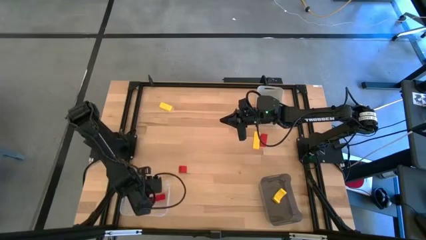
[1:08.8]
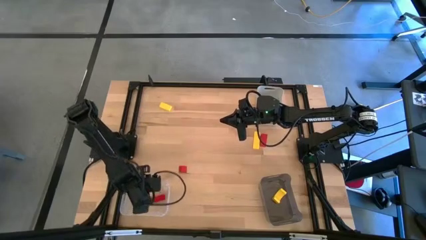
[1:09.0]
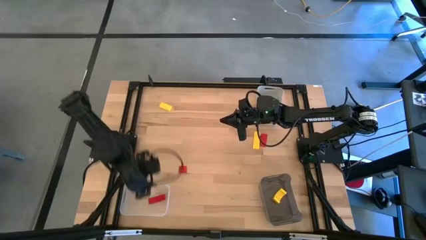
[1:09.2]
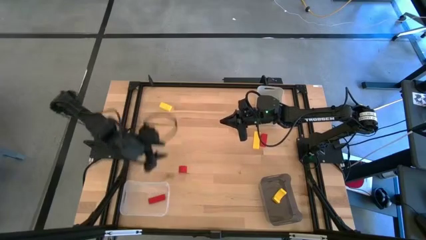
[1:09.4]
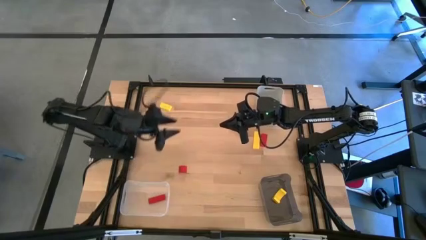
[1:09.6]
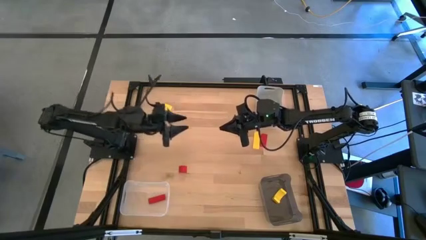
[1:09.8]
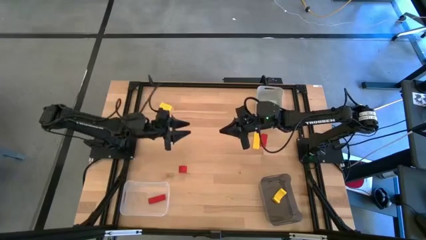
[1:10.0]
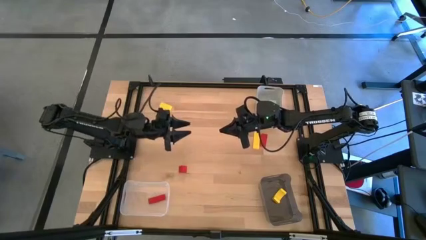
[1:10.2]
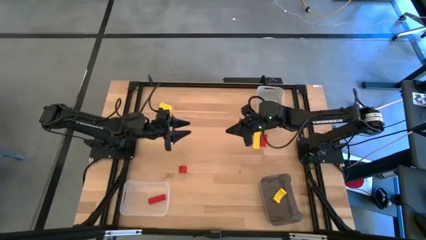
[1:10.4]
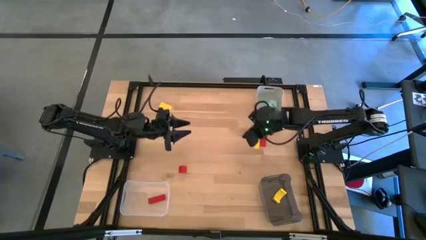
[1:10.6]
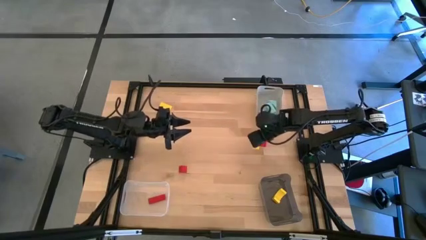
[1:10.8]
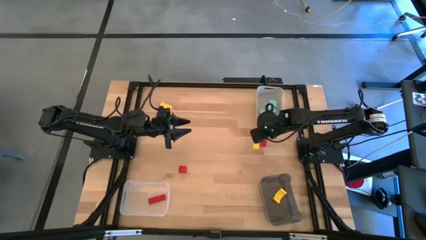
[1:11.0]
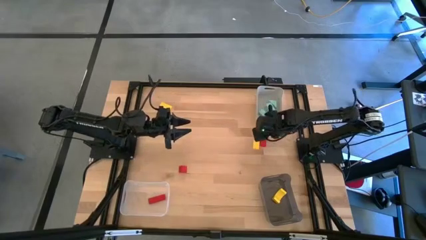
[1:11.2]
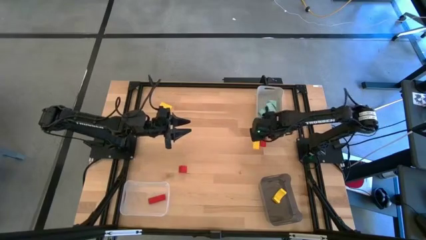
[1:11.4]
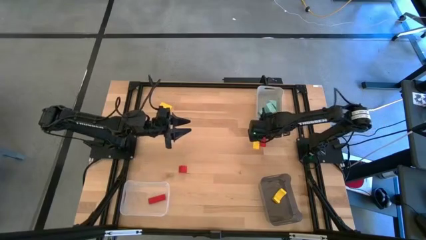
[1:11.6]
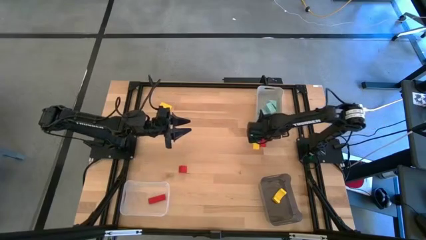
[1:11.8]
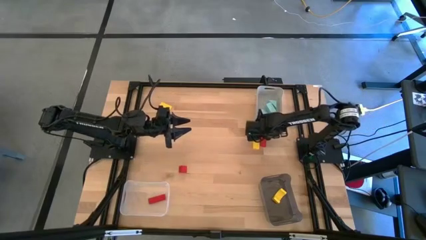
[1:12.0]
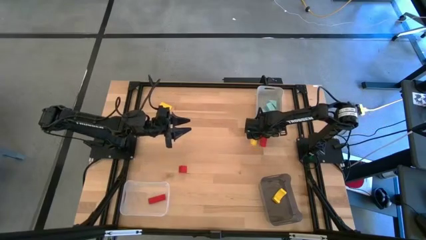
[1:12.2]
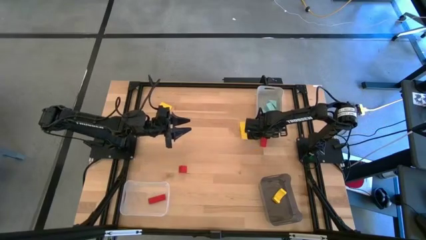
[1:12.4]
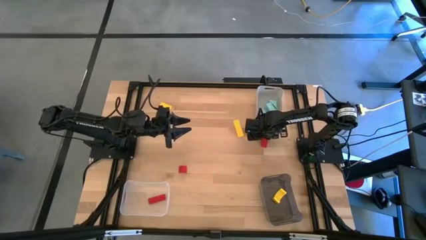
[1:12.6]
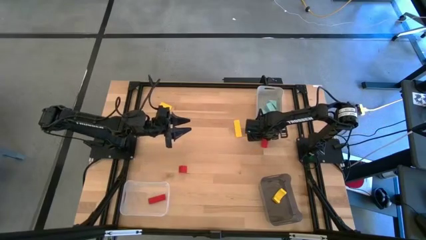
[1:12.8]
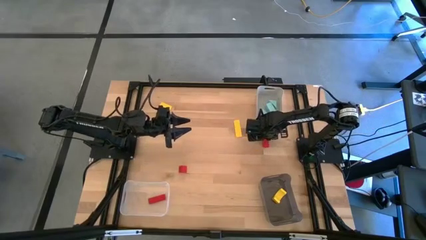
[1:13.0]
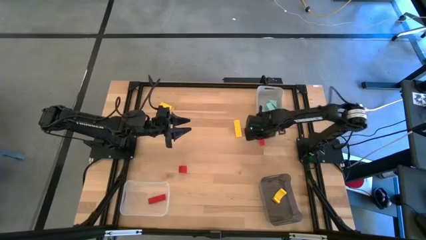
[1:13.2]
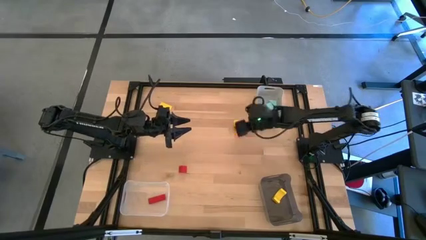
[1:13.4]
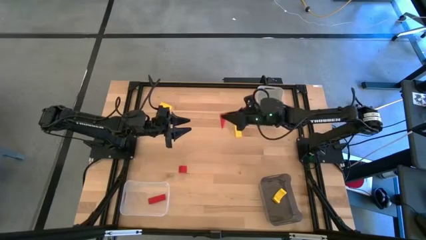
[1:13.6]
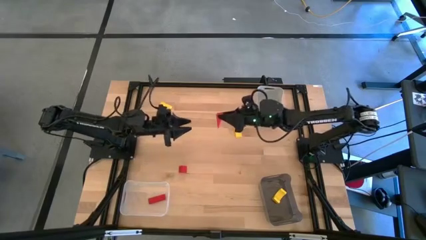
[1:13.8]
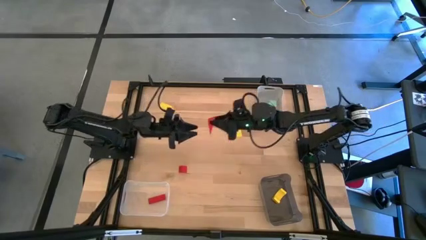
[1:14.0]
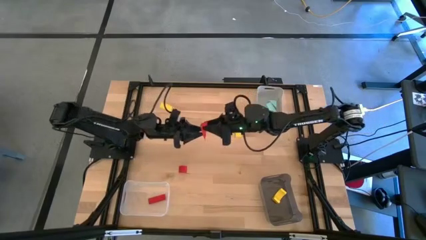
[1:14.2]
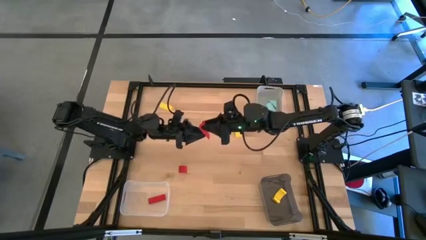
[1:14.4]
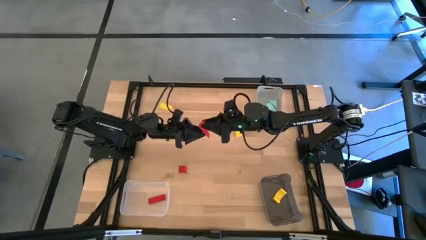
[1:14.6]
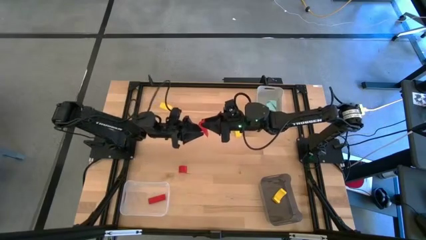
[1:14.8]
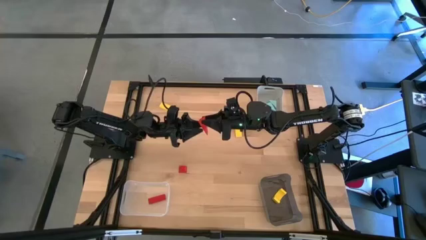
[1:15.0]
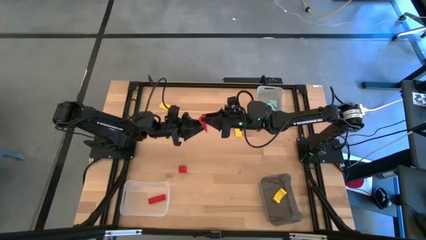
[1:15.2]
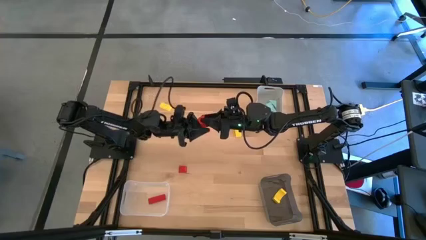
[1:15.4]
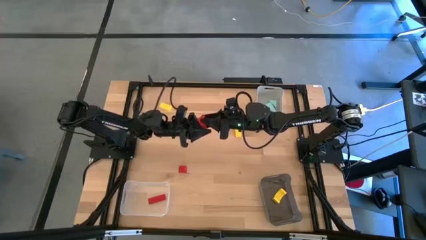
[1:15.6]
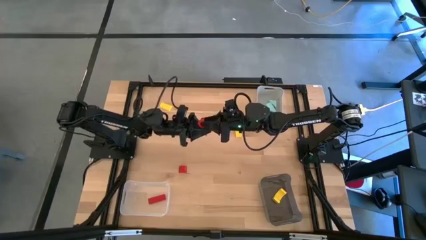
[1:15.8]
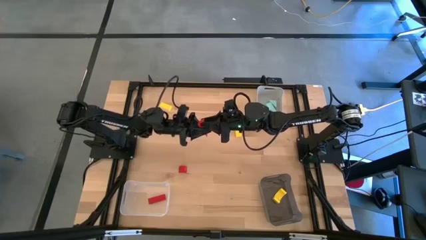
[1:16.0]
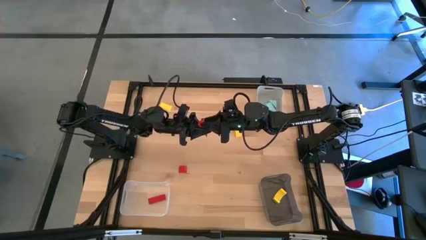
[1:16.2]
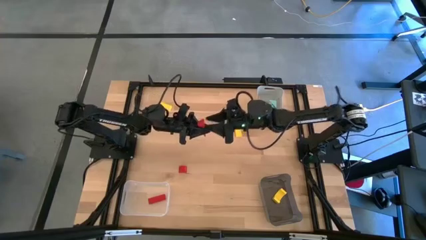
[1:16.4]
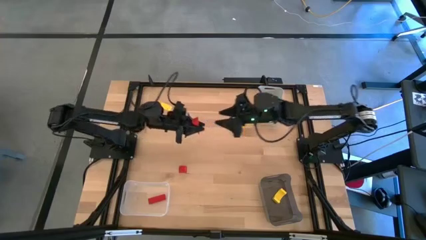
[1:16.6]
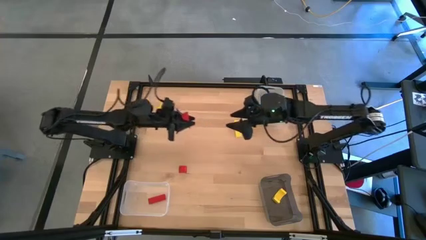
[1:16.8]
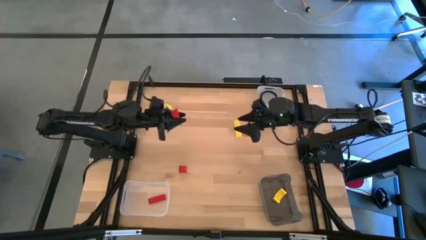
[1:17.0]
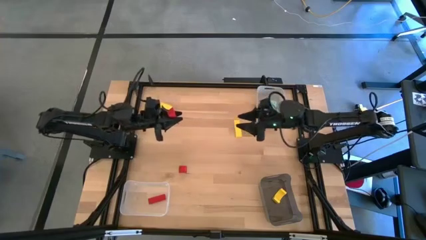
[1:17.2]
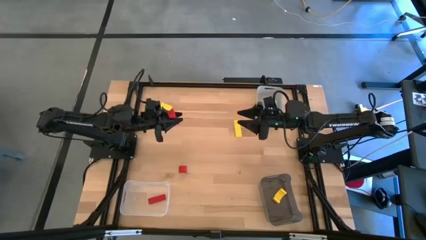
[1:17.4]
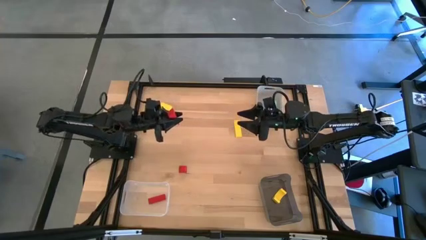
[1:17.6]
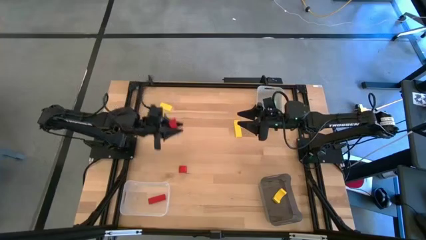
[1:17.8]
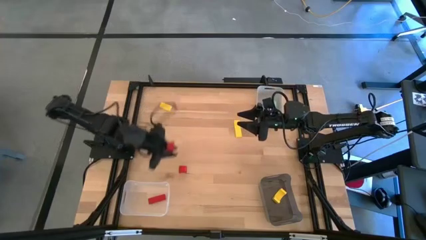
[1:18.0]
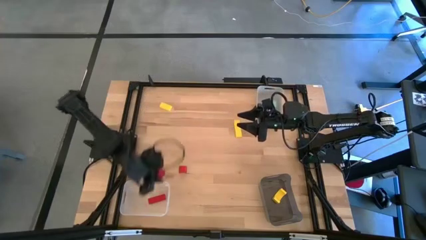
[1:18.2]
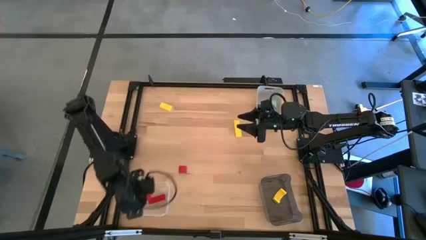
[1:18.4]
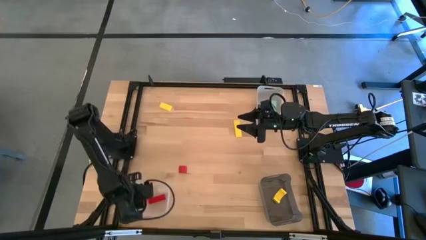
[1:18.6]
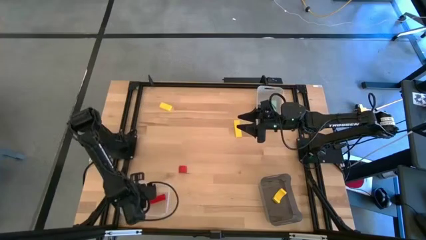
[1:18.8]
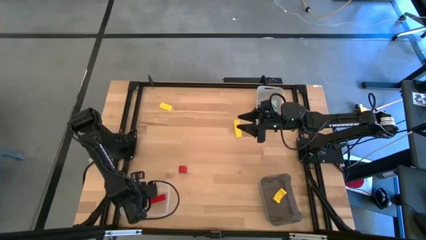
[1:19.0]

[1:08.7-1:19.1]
Task: Sort & place blocks by color
Put the right red block into the white bin

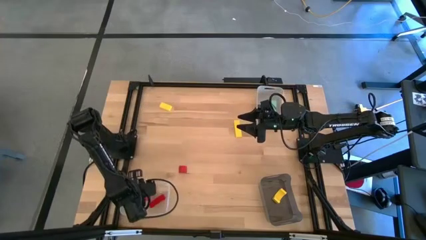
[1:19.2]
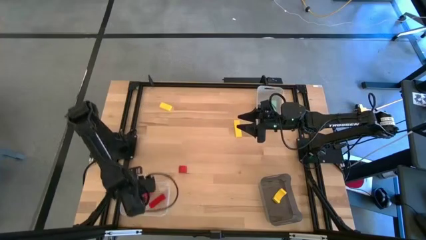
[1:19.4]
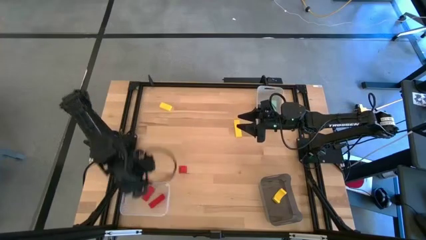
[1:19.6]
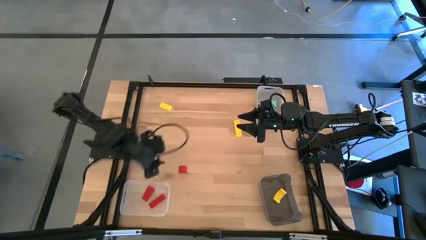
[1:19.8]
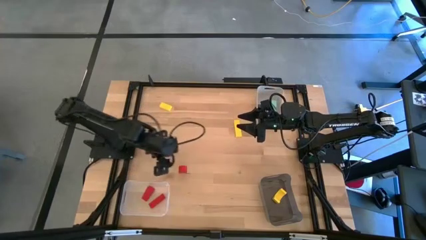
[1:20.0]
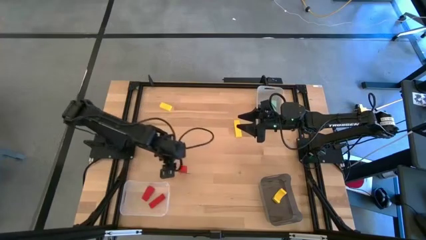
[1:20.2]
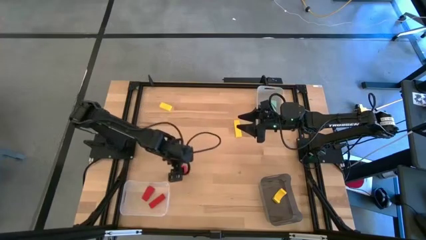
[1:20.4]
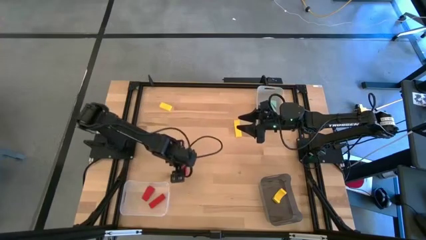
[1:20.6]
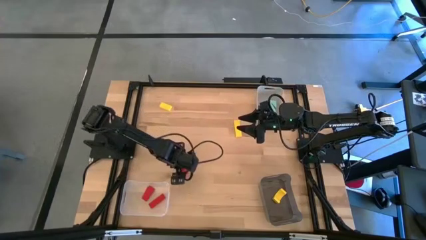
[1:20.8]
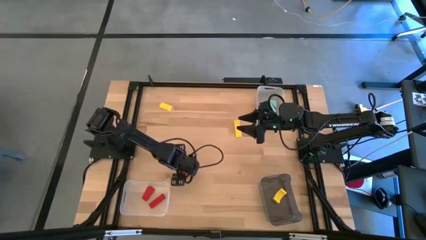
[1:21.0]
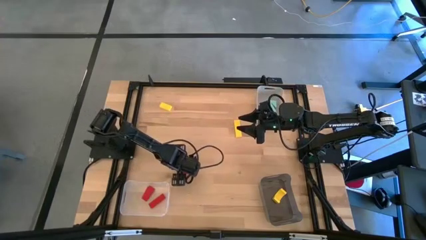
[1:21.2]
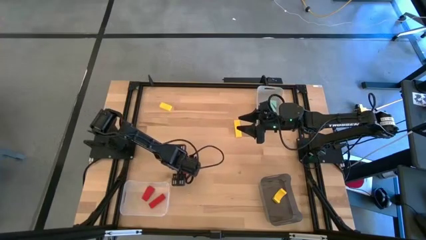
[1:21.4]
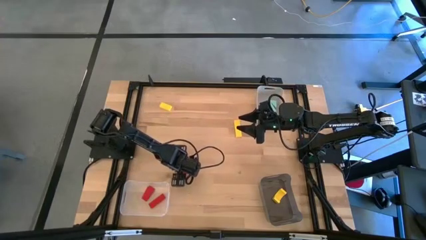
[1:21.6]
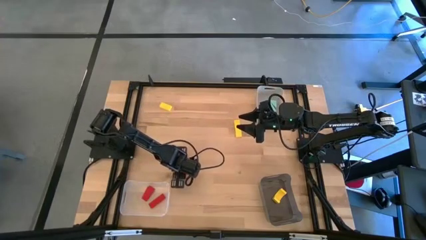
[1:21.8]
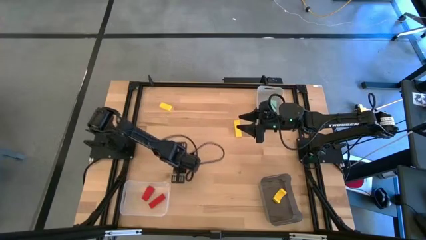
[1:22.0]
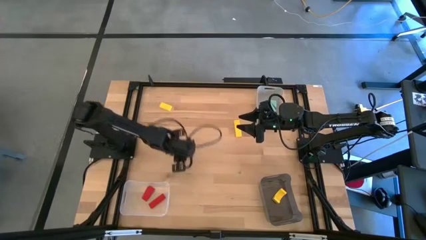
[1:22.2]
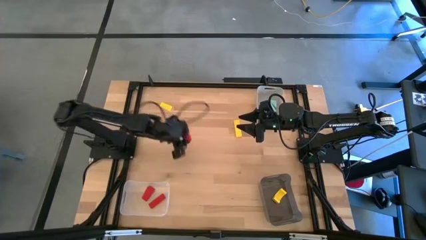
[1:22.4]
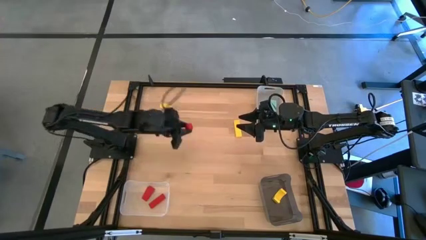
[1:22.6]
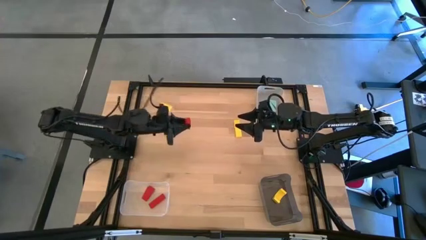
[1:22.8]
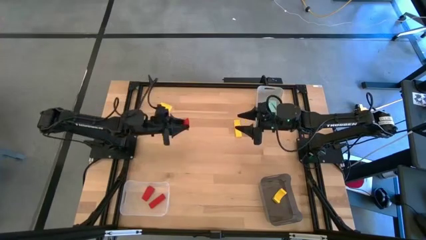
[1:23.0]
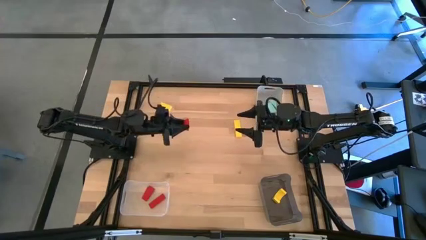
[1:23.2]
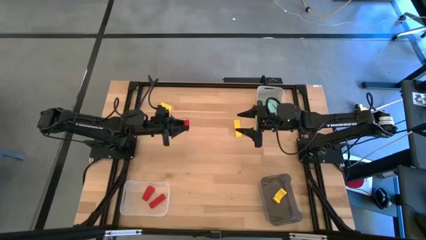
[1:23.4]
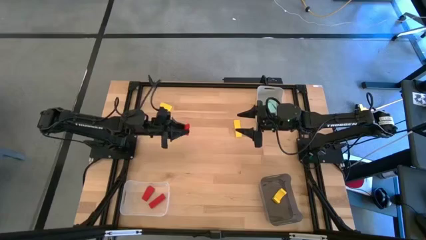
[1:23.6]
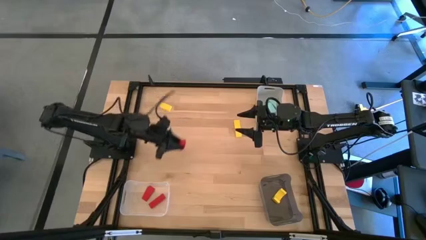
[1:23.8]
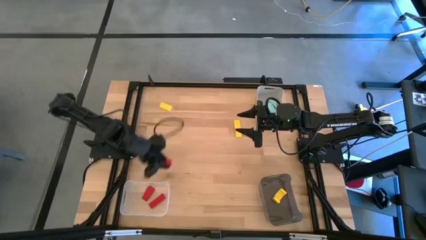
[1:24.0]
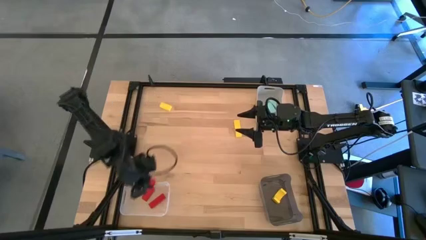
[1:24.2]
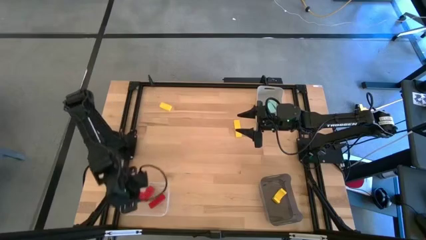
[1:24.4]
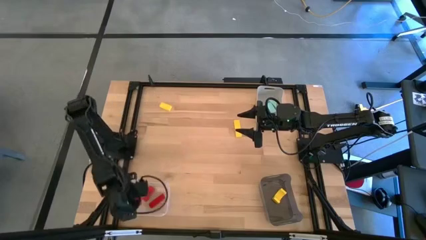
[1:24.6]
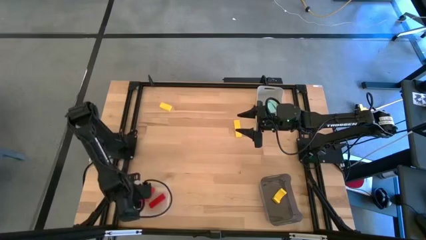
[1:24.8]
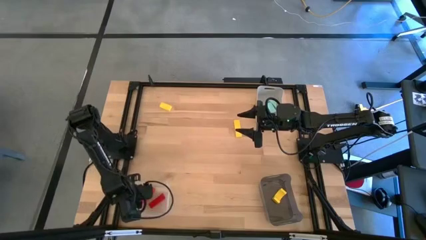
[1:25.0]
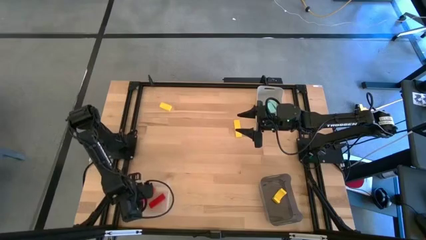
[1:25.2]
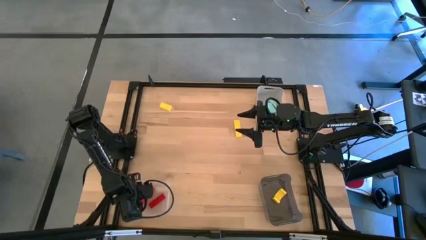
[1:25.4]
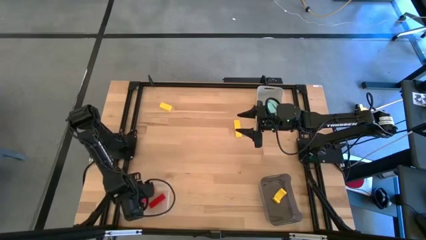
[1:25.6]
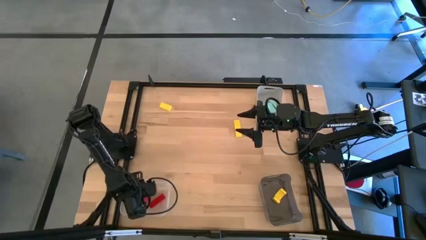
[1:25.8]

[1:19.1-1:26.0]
Put the red block into the white bin
